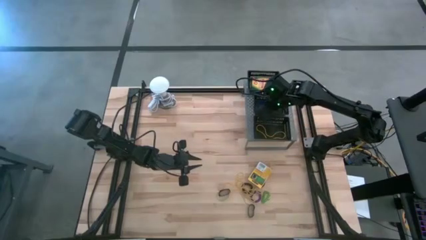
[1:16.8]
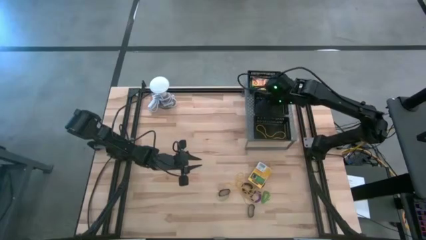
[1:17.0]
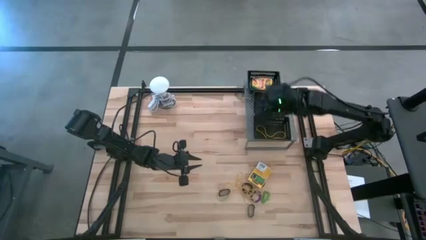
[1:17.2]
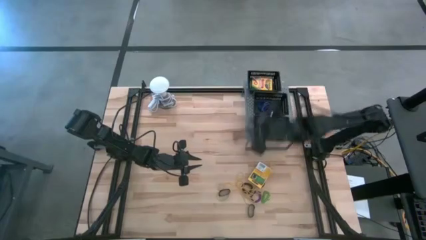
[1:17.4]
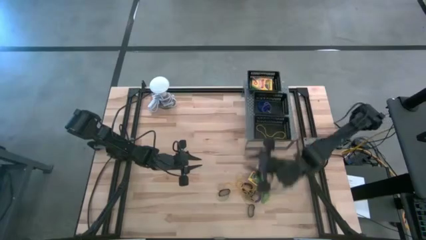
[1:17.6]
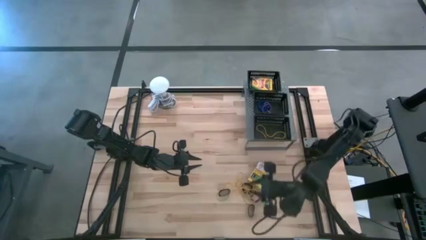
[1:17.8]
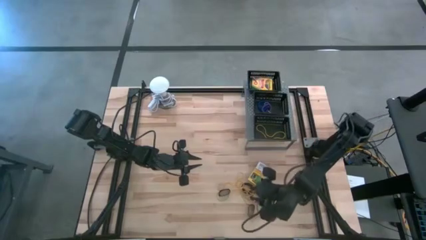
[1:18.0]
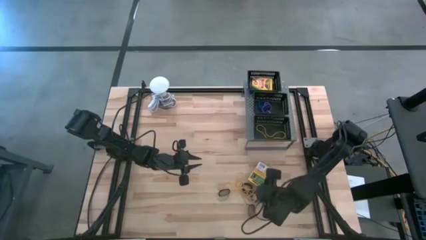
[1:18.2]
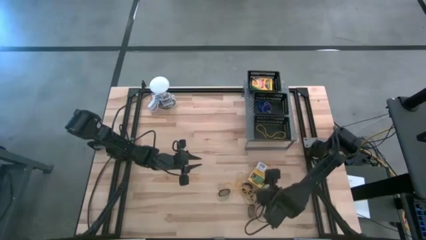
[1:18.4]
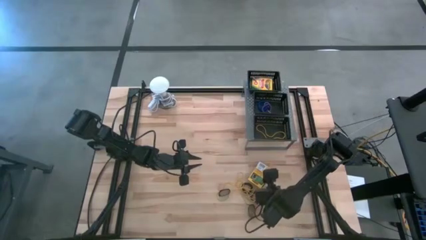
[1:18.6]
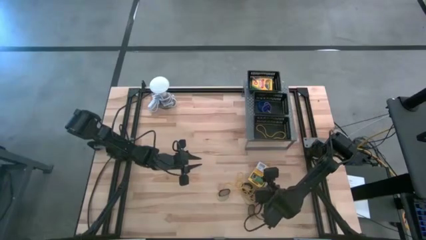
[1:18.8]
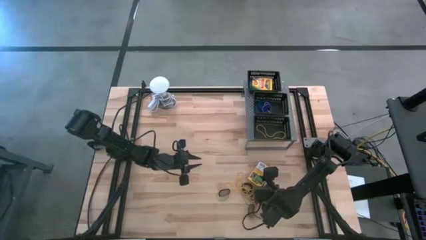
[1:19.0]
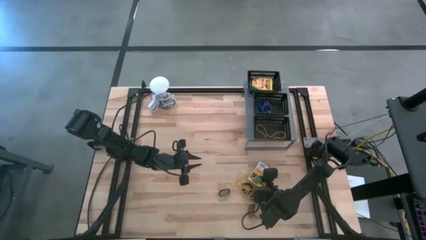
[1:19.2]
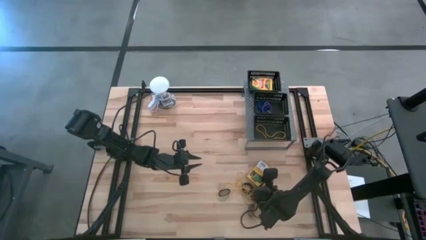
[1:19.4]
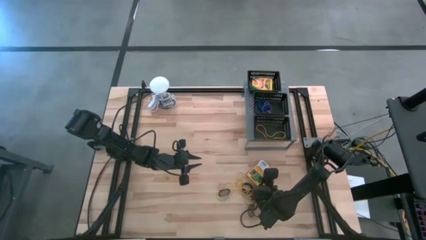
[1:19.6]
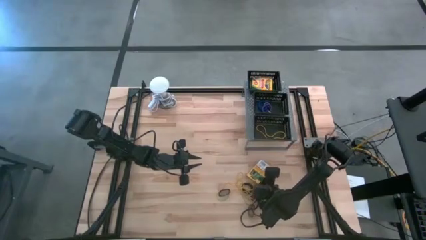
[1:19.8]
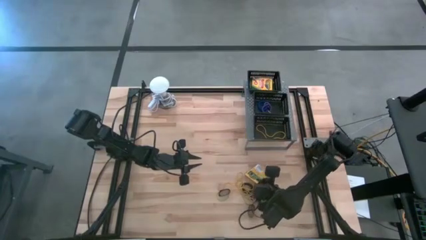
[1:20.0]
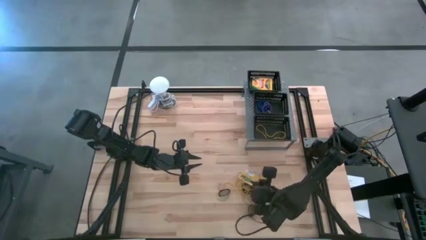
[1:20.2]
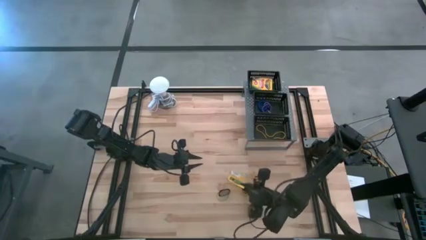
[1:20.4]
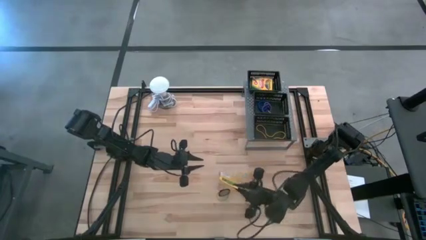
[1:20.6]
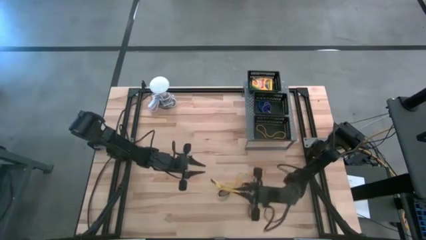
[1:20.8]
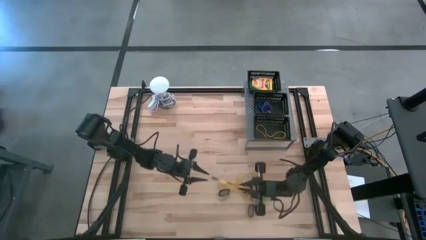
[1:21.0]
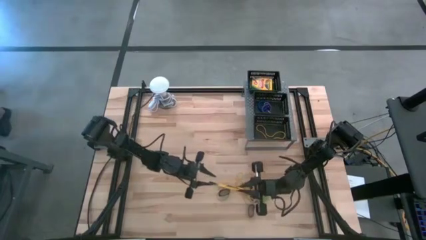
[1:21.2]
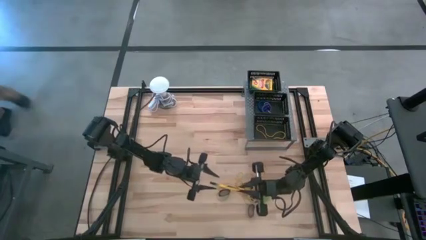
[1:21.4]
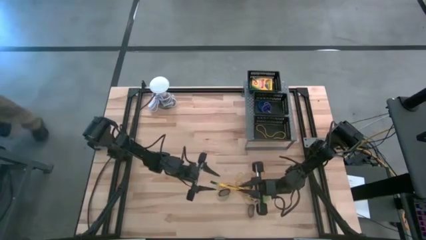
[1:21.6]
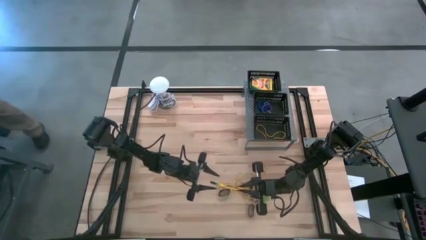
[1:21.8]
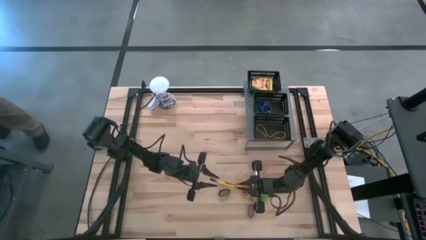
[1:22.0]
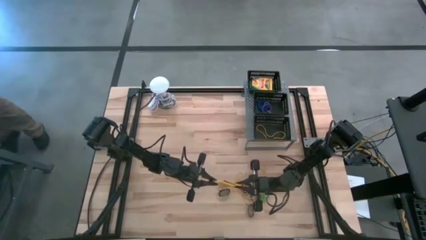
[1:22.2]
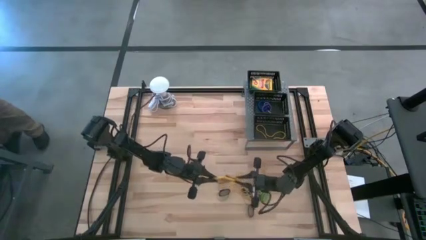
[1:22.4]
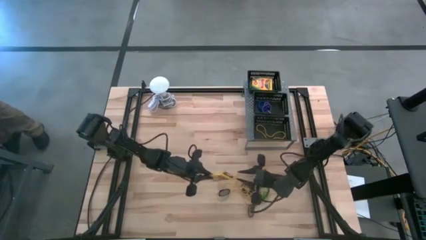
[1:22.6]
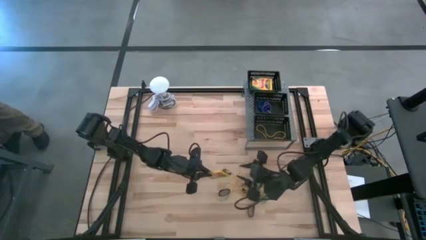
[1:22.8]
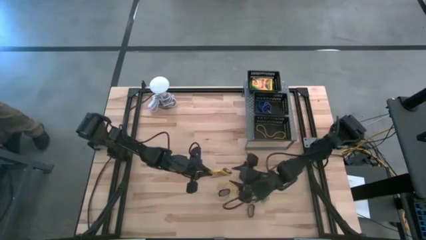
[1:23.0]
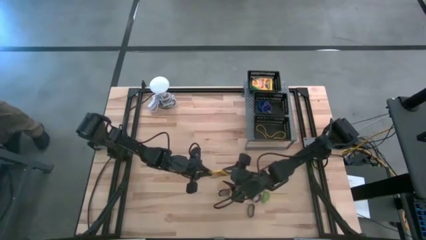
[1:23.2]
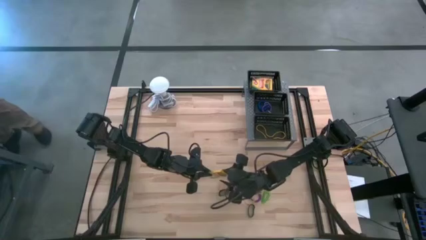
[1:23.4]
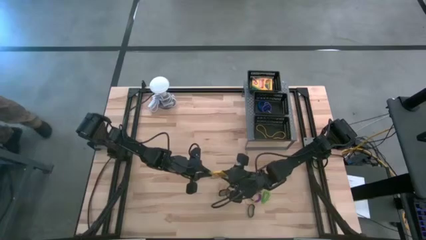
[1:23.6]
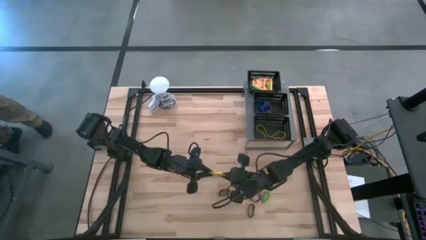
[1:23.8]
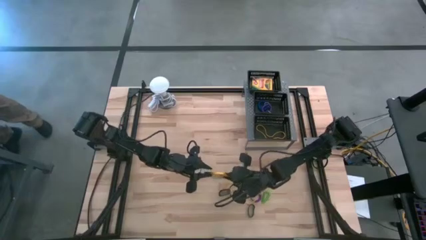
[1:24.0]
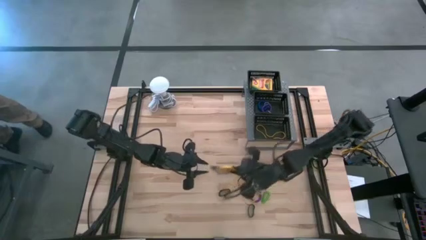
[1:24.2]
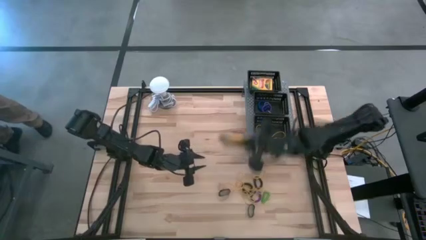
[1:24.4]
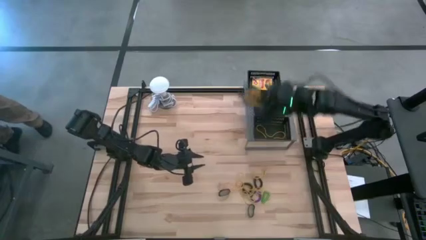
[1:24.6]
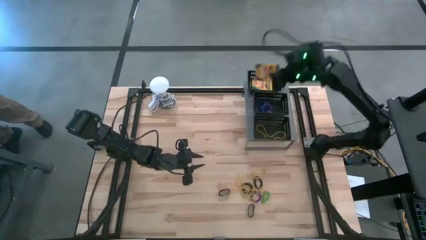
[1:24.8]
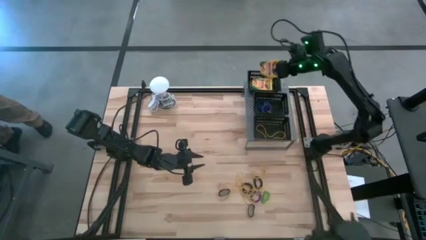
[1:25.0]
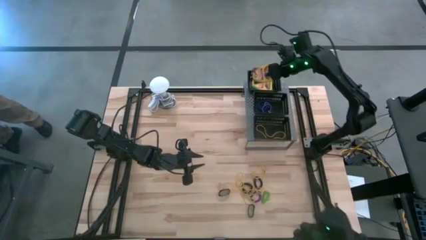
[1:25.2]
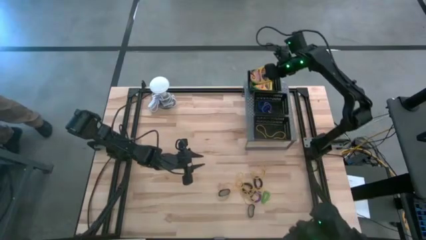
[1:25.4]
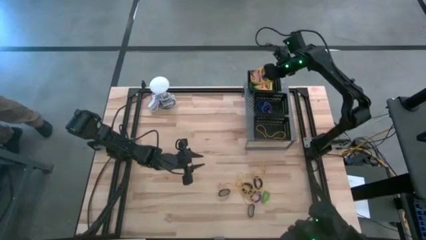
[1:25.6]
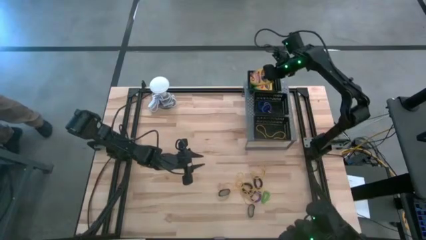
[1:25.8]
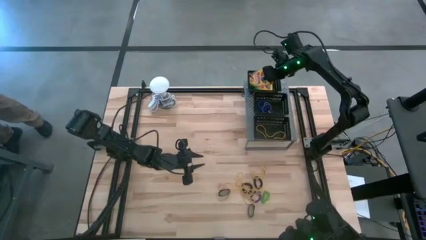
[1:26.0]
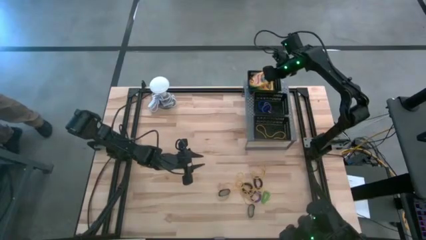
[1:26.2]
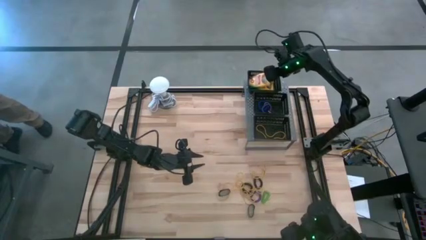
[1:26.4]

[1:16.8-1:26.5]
Task: Pick & Place Office Desk Supplies
Put the crayon box into the top black bin on the shelf

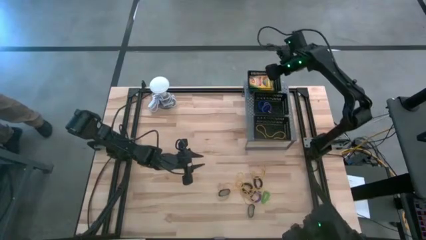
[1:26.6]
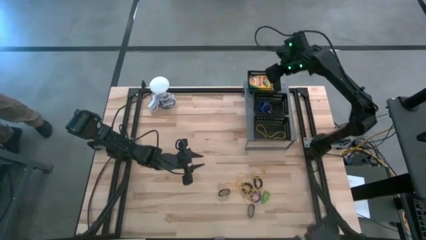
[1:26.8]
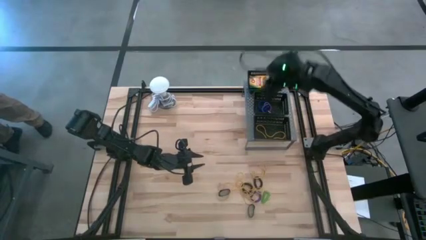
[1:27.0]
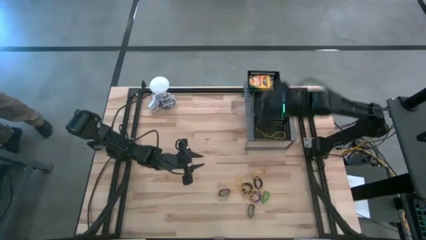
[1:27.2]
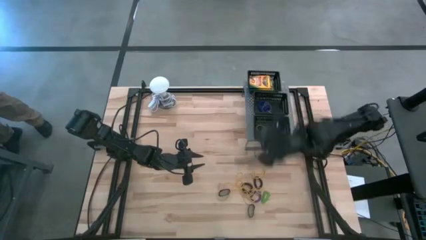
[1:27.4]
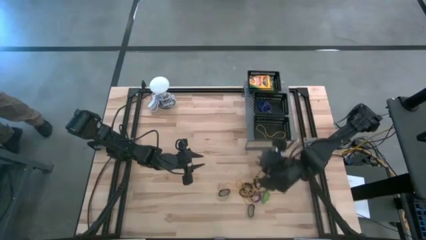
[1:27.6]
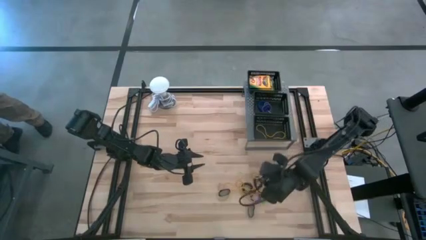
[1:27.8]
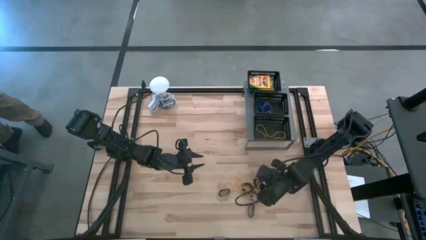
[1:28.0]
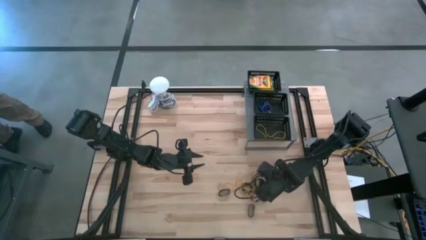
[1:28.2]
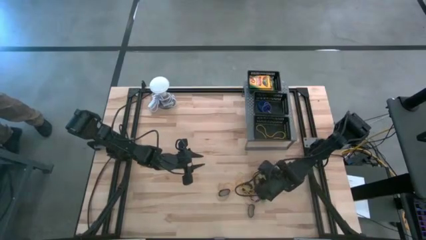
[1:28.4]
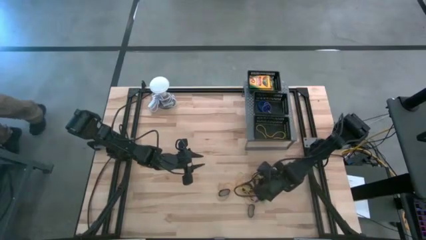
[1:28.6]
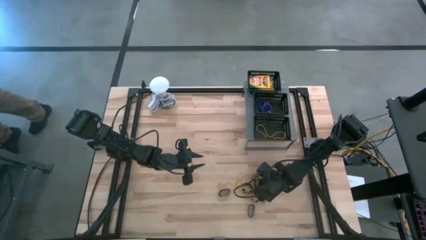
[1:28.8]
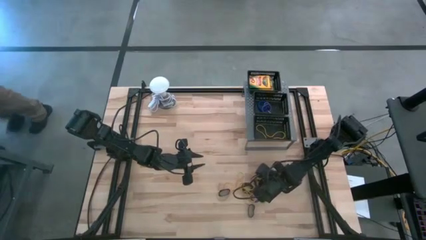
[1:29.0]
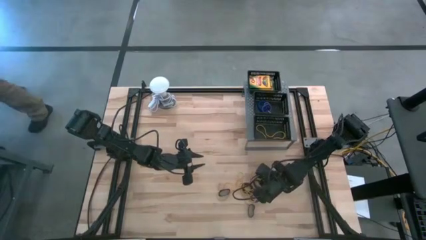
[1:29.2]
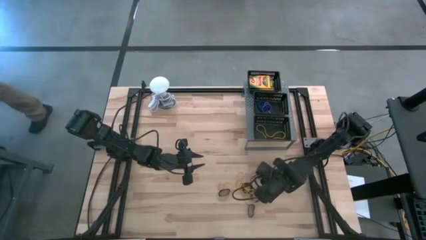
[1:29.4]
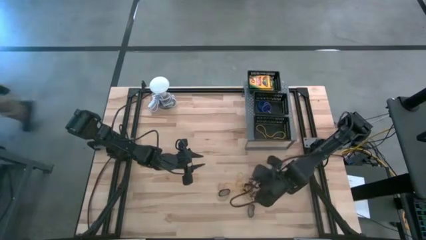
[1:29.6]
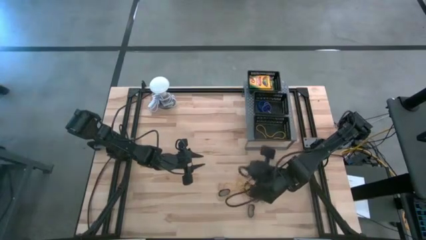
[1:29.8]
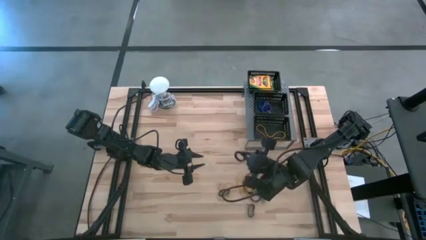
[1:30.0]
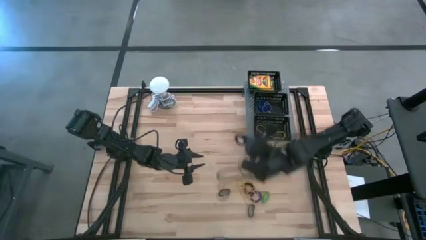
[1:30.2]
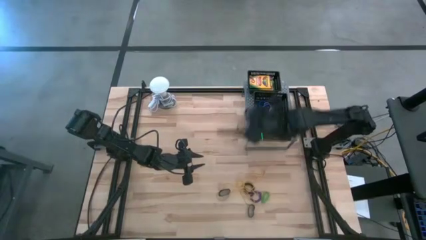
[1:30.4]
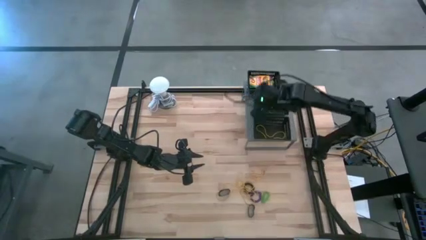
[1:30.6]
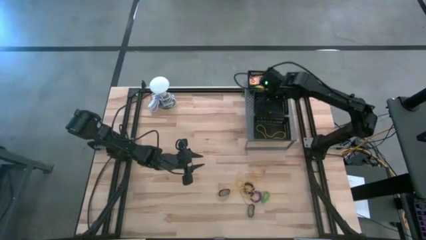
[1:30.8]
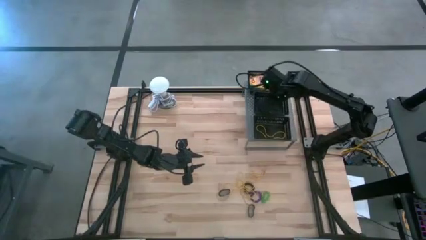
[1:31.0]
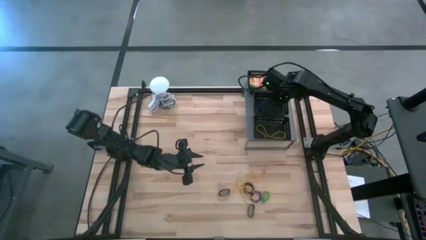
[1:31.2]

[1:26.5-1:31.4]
Put the black spring keychain into the middle black bin on the shelf

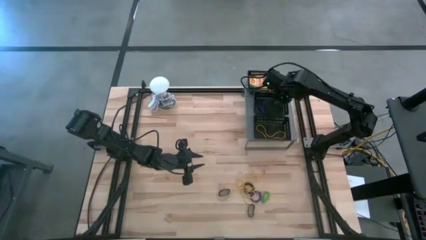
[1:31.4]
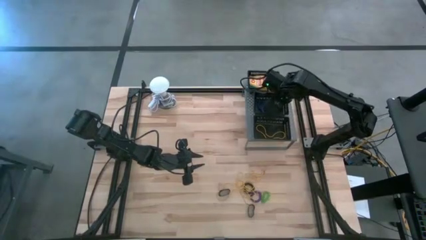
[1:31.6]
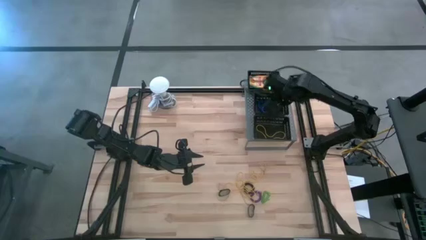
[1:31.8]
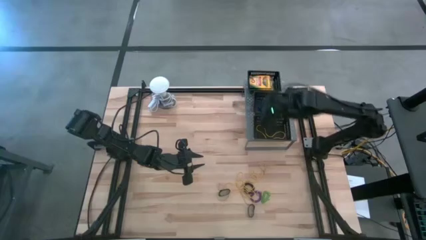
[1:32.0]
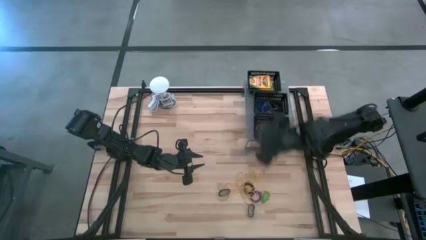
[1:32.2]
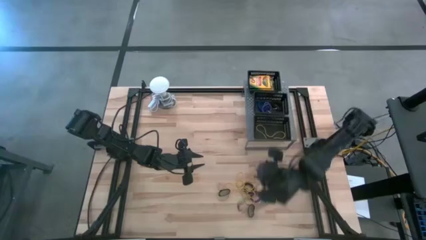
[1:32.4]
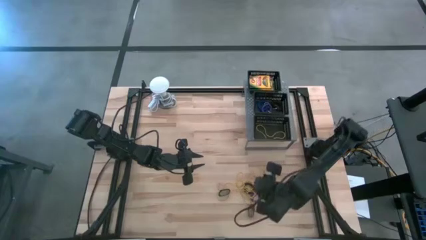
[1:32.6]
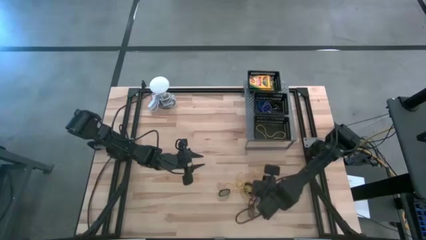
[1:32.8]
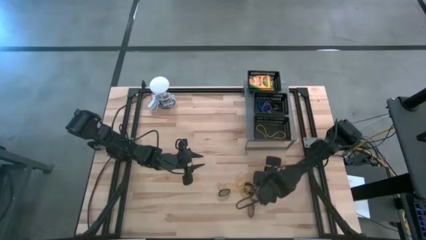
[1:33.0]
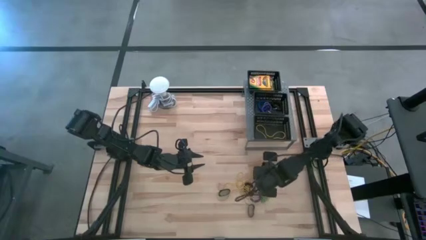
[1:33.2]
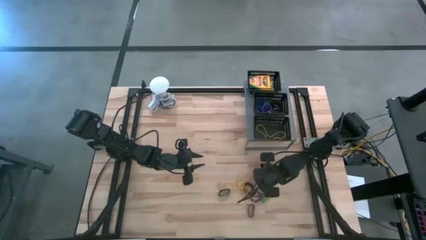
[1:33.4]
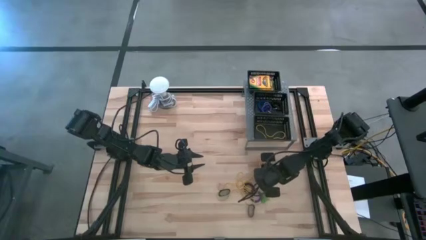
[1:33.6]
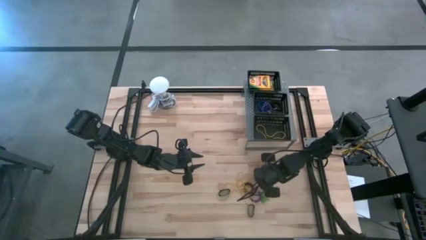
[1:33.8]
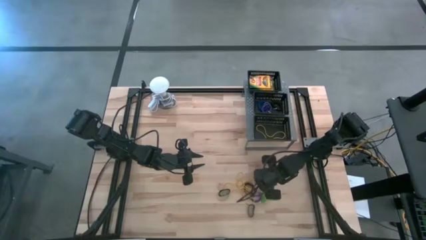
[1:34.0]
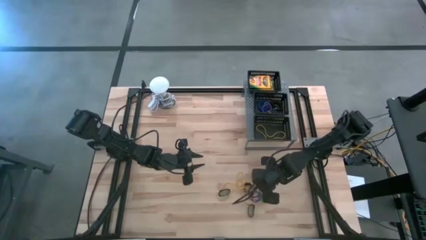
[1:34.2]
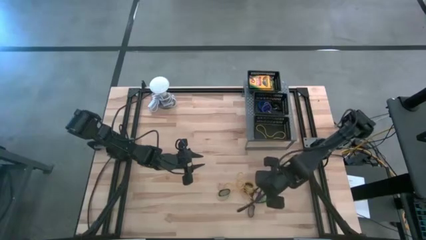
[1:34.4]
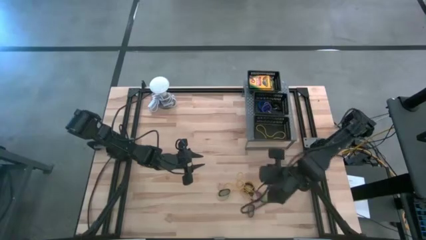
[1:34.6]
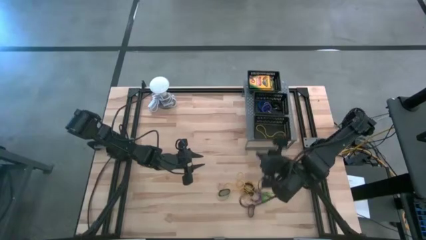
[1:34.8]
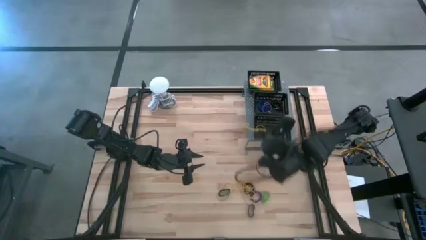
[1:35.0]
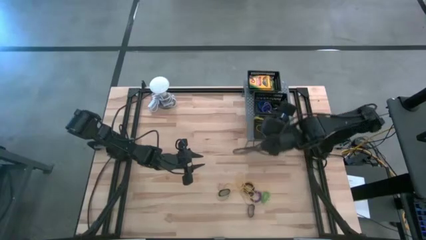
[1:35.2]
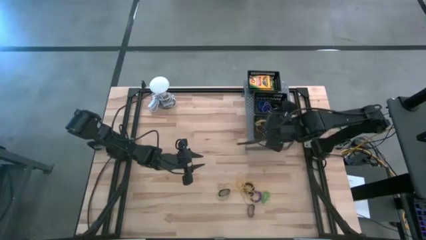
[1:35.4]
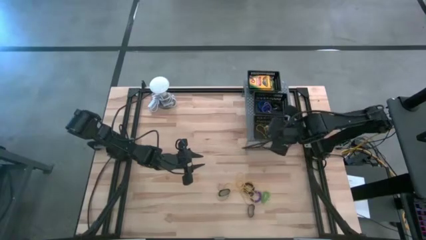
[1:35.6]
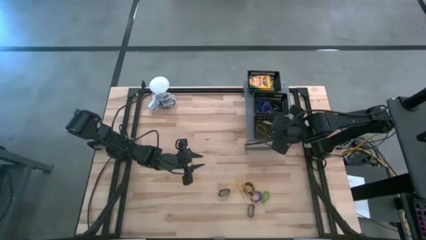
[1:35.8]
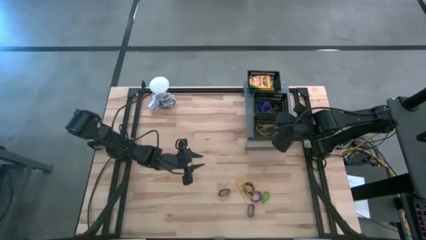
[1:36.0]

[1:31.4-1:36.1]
Put the yellow rubber band into the bottom black bin on the shelf
